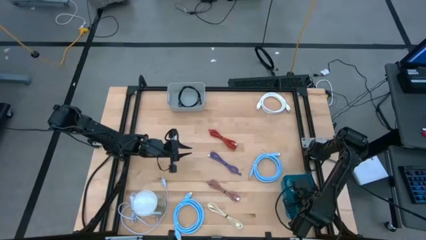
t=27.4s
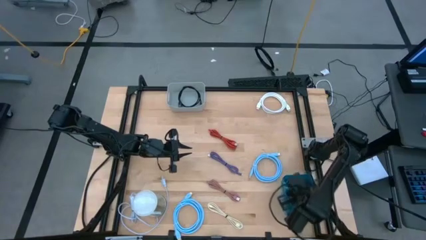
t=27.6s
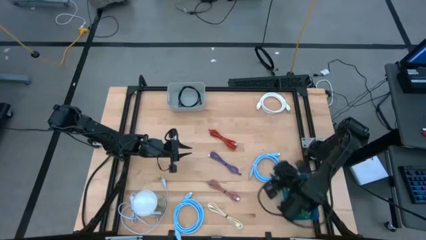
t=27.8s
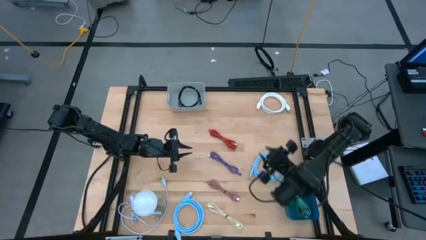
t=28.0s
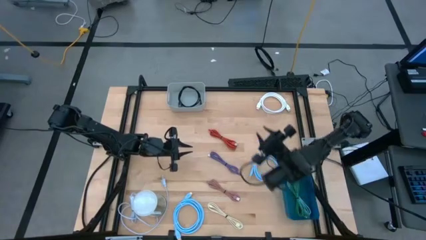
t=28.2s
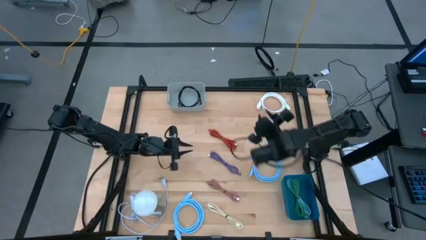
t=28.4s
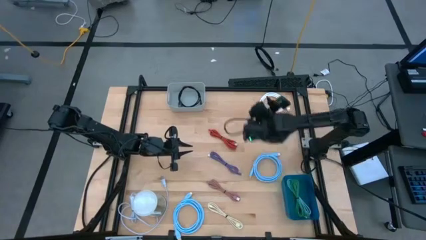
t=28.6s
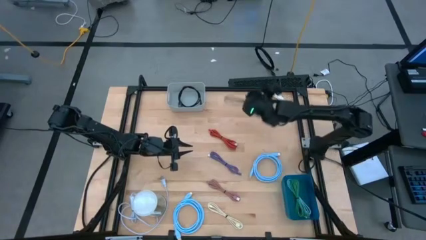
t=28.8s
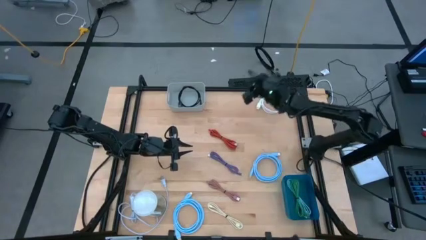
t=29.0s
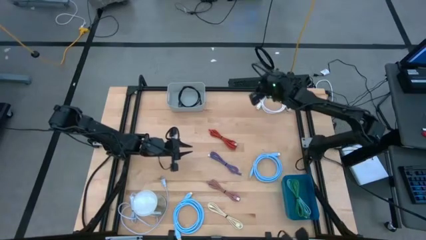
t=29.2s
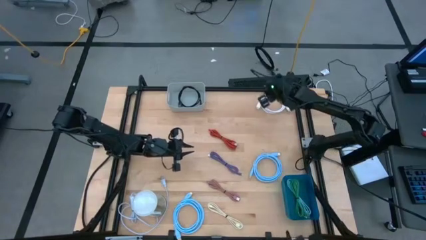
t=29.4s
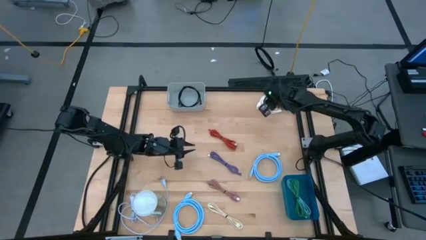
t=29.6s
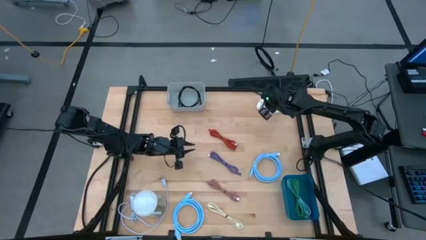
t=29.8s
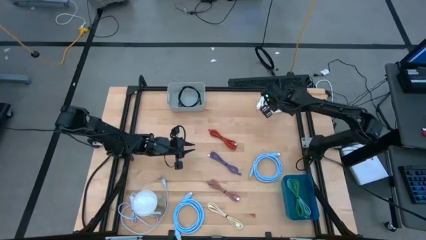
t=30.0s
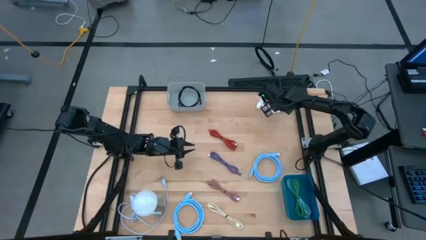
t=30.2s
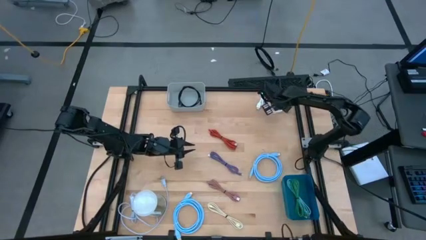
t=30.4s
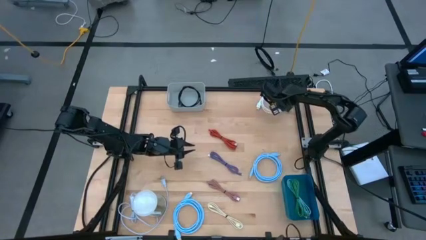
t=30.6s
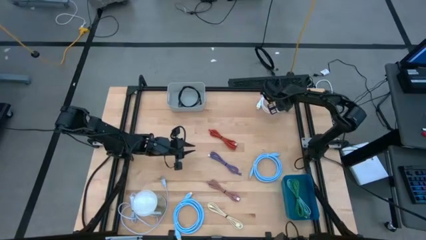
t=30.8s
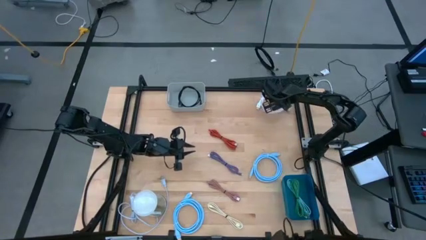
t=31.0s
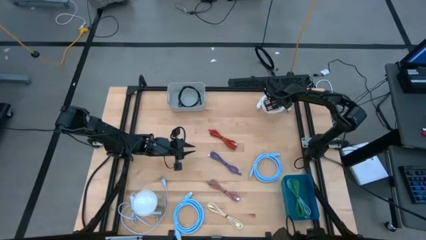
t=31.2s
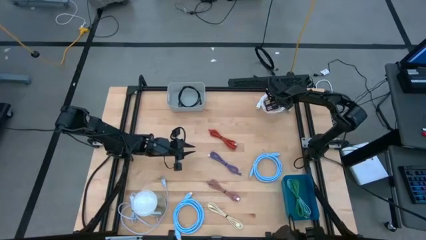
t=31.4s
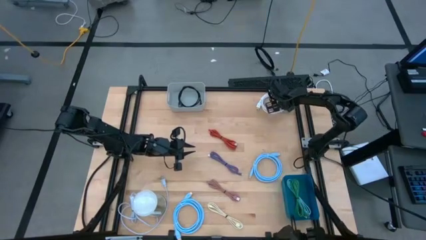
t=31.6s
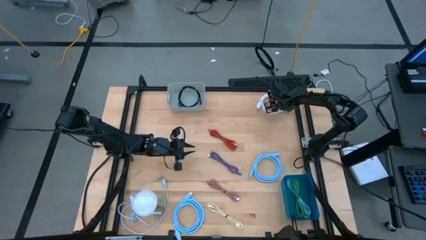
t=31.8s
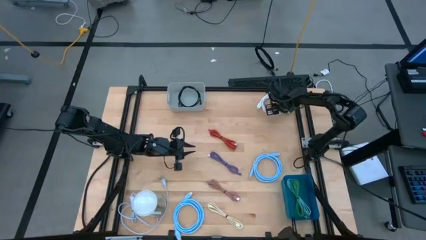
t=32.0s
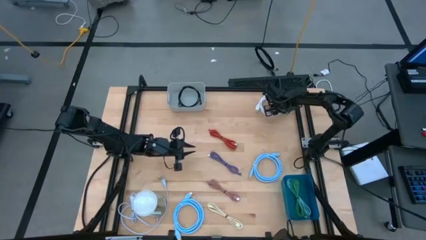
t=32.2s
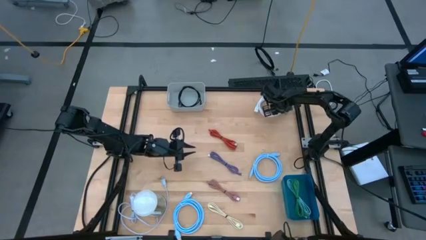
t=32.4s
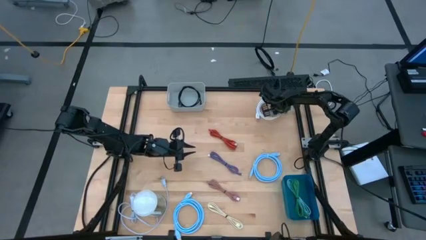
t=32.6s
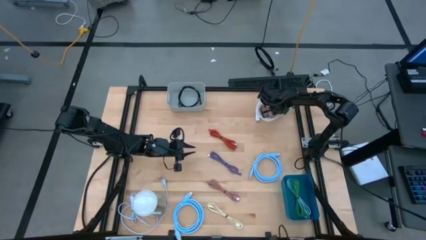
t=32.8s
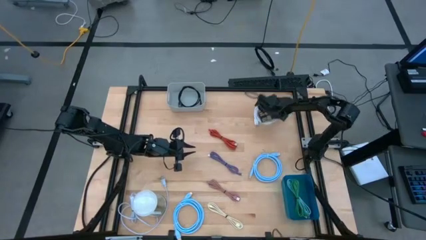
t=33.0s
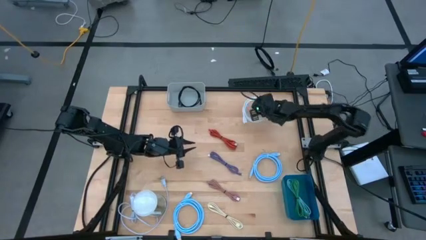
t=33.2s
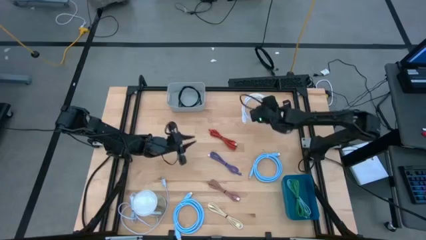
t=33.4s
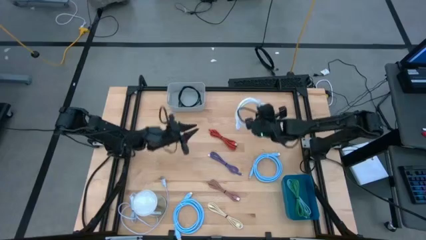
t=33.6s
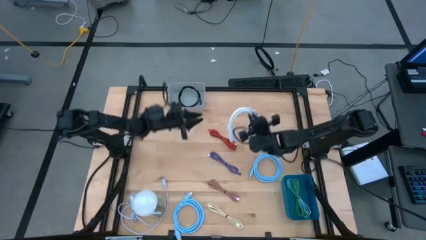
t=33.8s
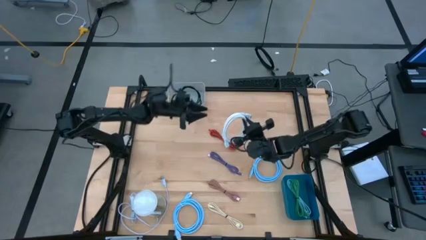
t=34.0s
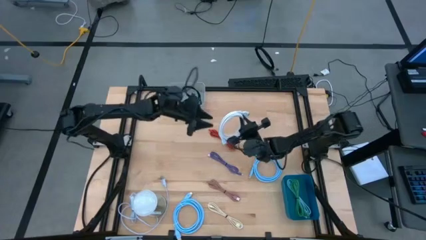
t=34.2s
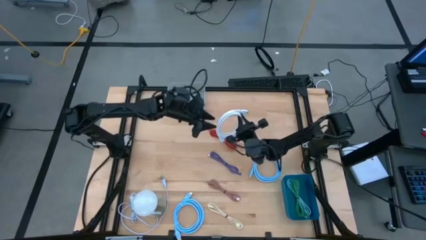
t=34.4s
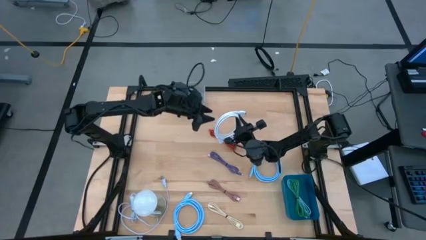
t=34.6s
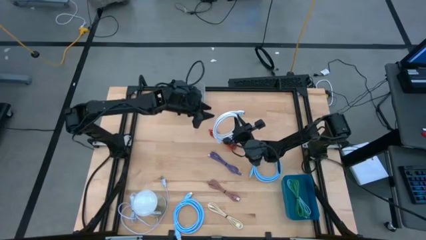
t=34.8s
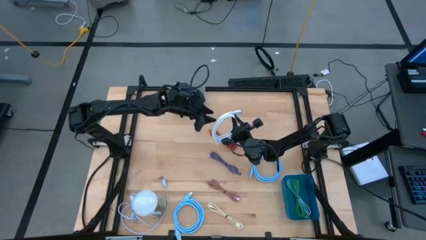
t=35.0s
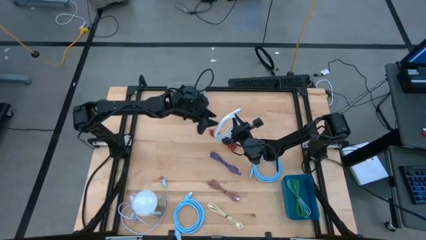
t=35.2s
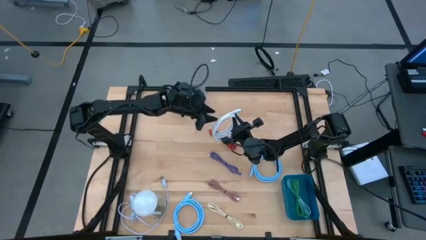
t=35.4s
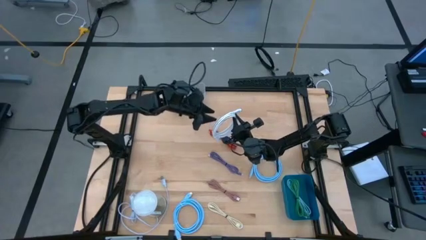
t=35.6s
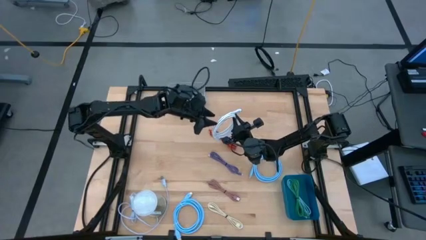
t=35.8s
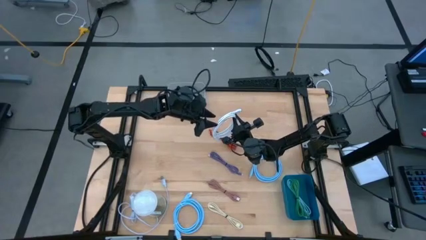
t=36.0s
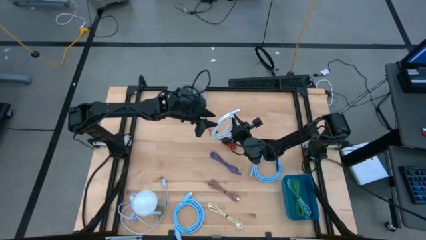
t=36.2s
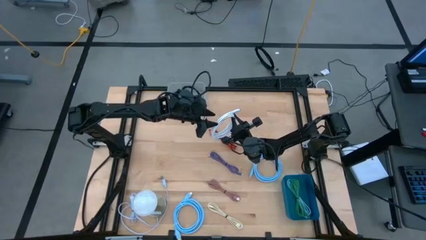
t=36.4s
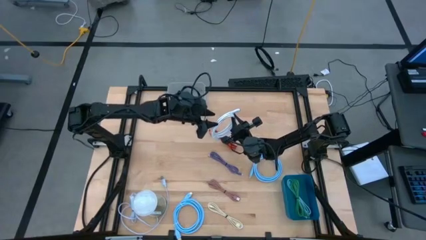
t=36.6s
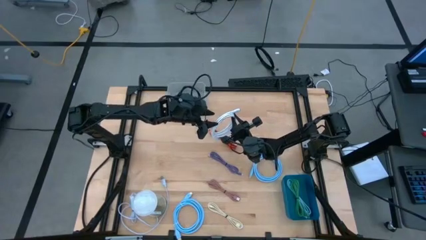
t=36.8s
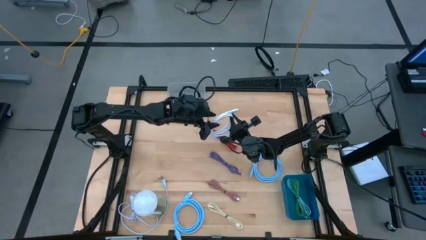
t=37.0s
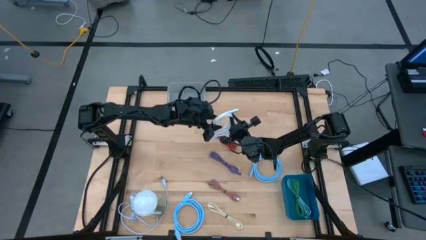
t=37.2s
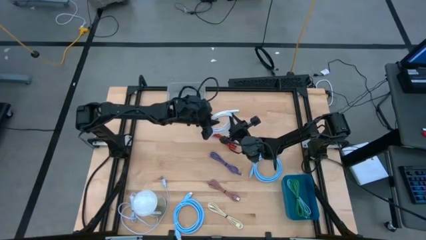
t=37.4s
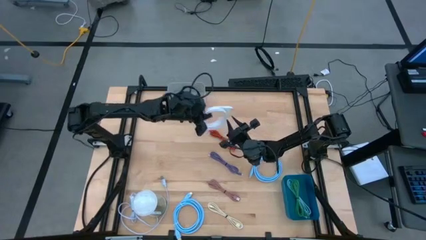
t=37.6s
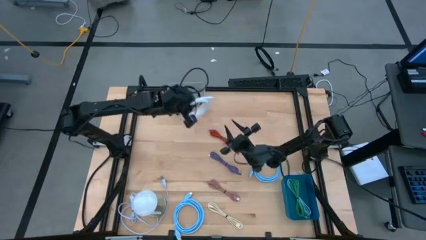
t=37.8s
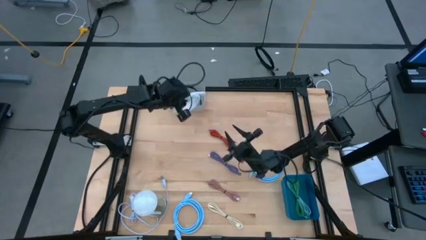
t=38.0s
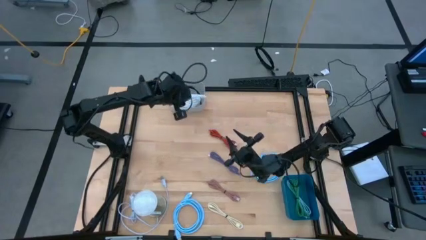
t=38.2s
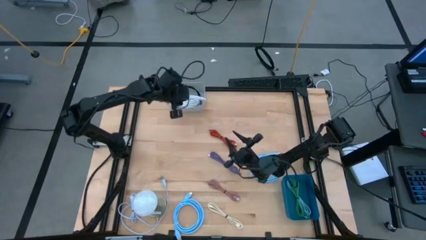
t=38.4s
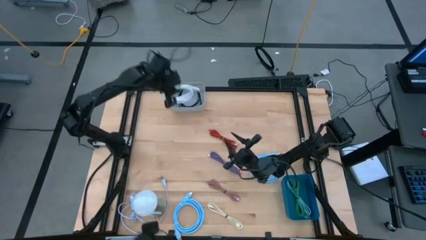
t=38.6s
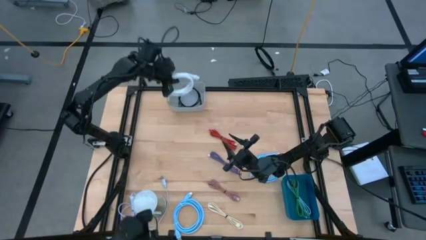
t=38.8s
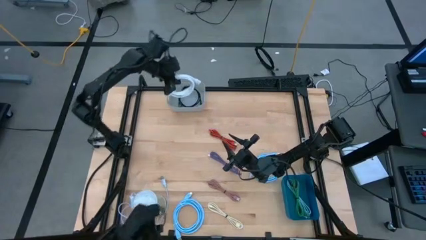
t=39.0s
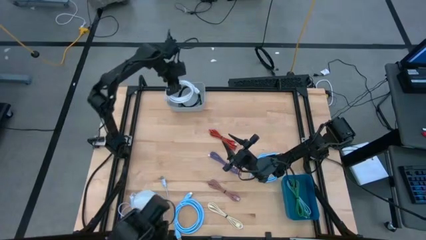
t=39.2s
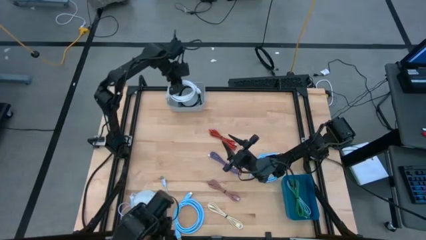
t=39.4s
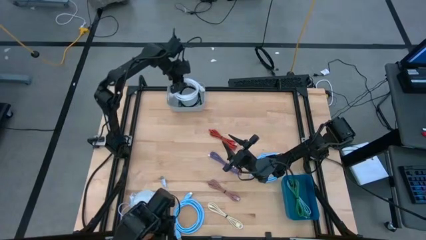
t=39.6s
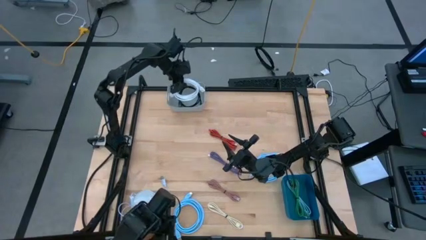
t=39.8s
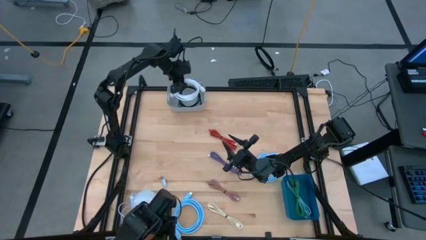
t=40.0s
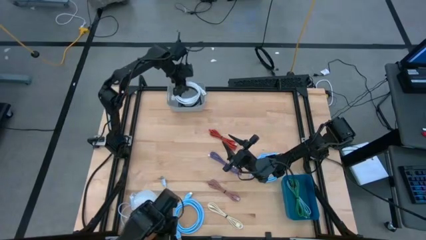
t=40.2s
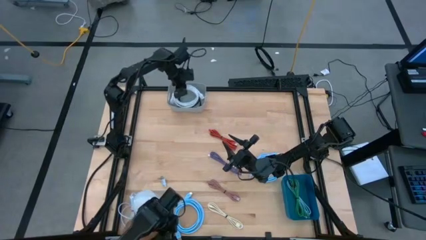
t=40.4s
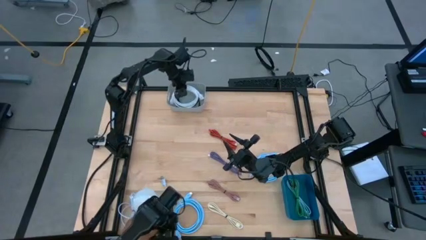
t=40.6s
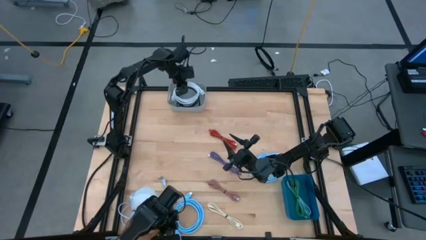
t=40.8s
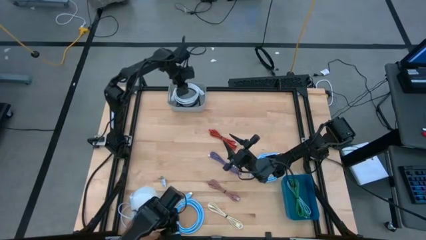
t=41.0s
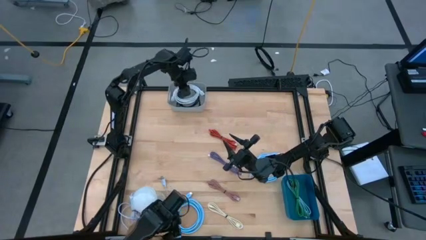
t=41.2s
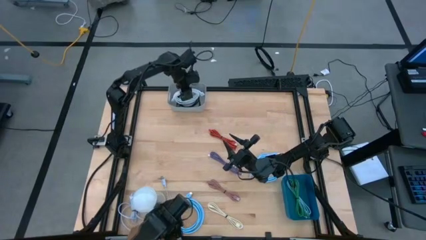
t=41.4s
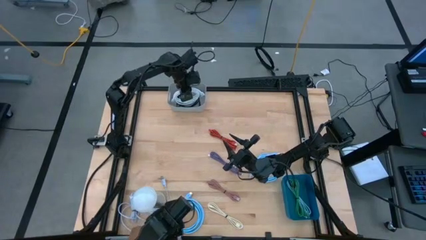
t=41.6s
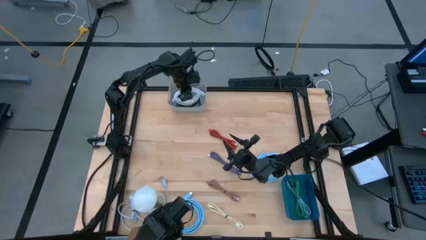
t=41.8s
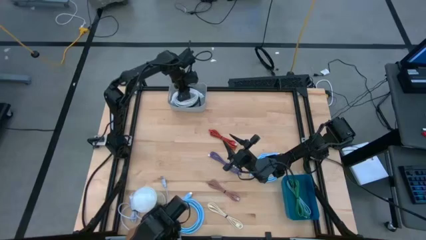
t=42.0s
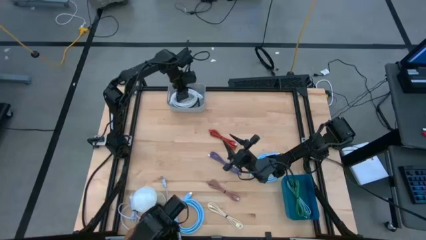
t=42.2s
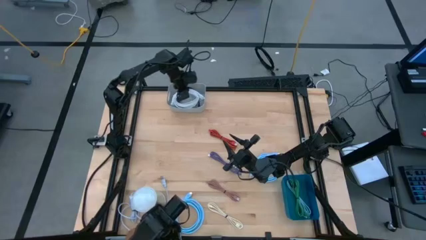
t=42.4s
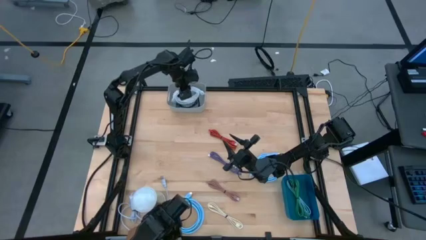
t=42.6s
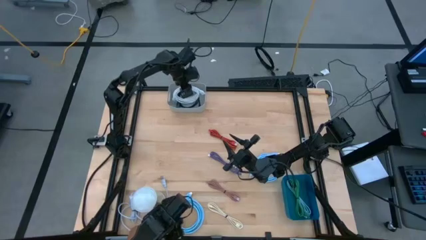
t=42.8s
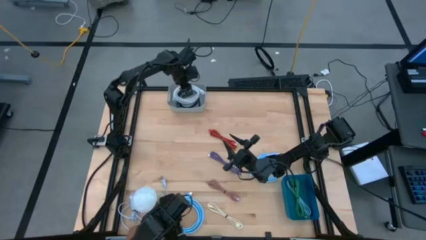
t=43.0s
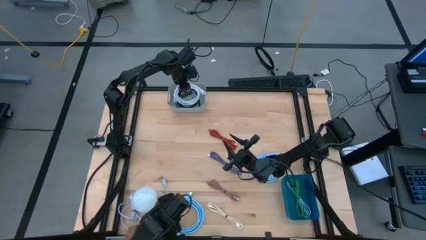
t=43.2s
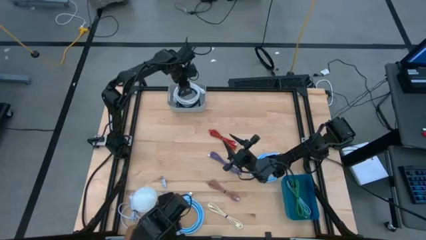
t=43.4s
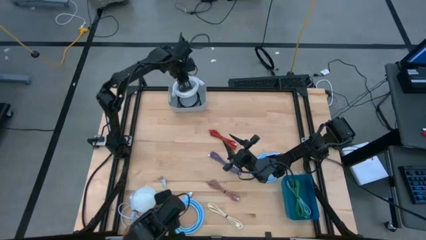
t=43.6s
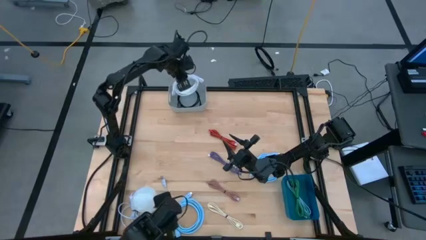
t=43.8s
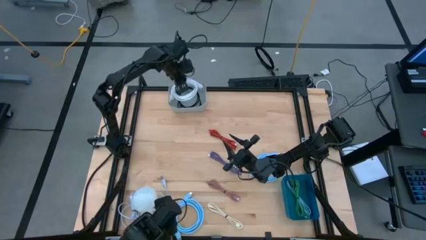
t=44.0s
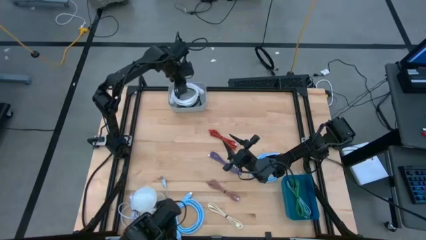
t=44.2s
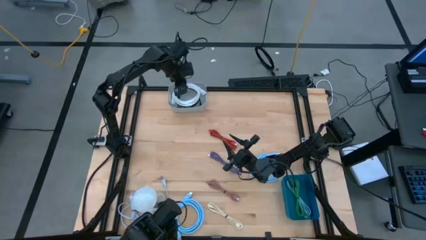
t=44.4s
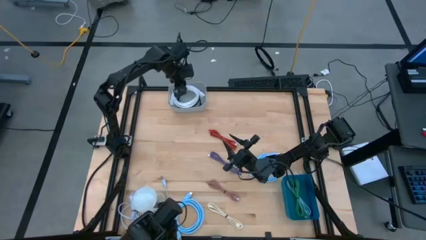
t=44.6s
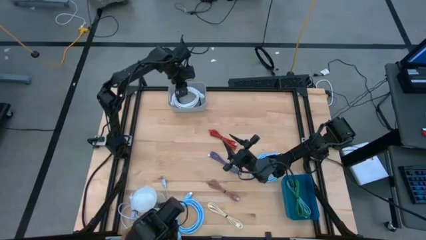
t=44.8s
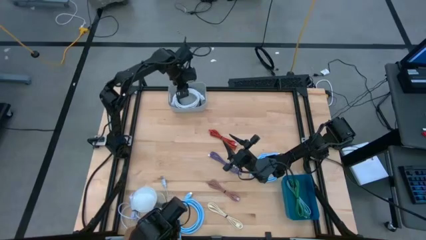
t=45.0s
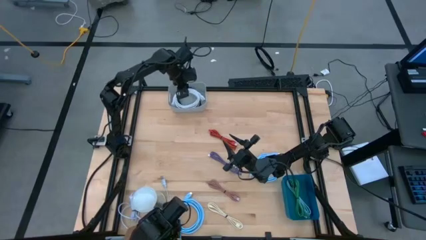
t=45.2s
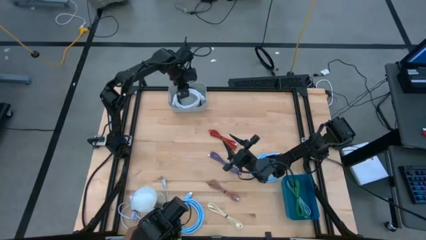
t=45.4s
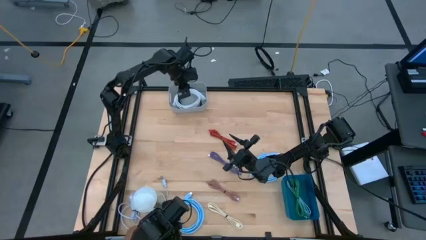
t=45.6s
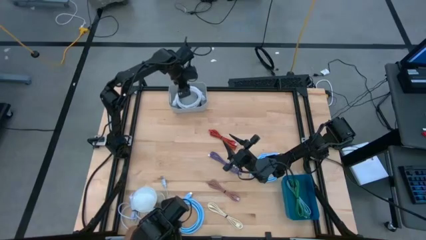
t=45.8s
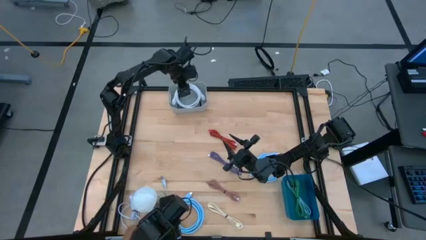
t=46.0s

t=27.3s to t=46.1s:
Task: Pick & Place USB Port
Put the white HDMI cable into the gray bin
